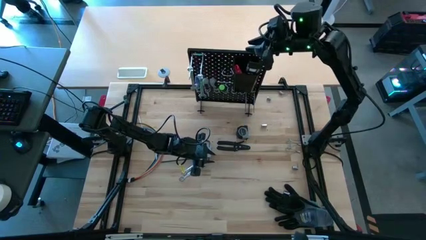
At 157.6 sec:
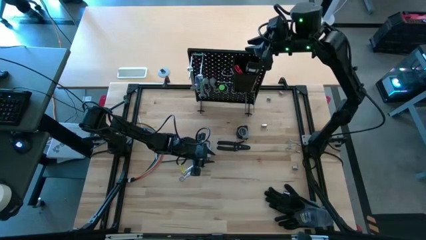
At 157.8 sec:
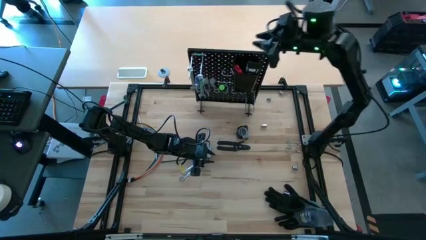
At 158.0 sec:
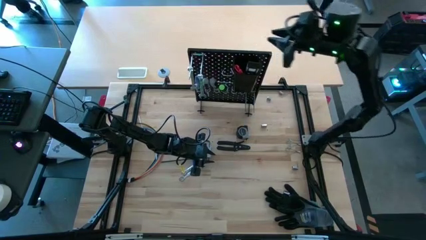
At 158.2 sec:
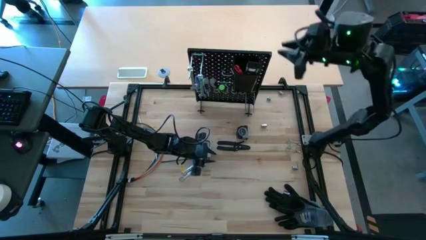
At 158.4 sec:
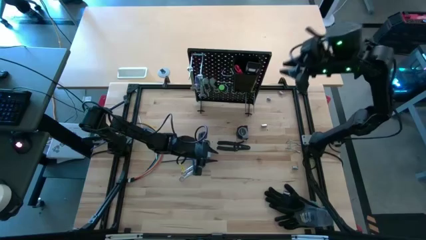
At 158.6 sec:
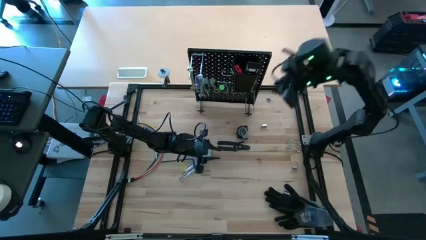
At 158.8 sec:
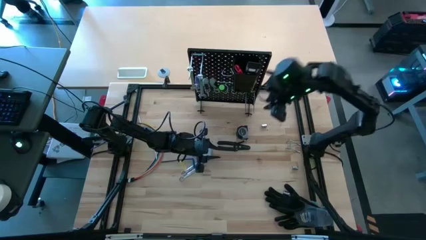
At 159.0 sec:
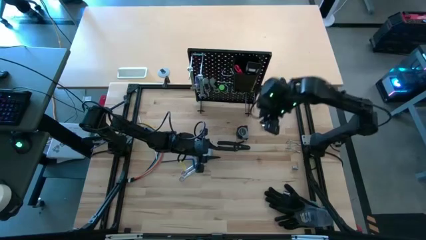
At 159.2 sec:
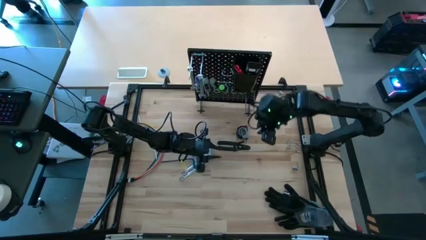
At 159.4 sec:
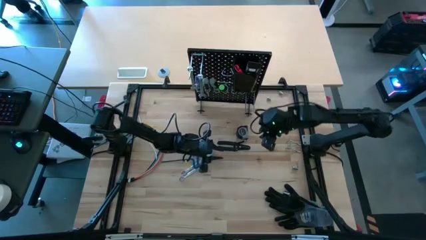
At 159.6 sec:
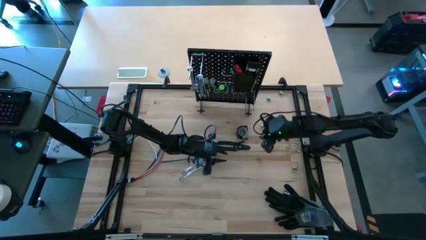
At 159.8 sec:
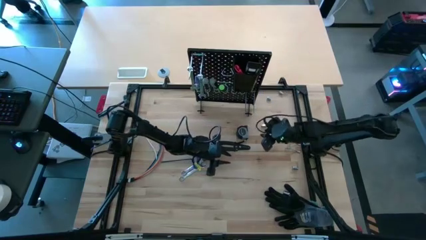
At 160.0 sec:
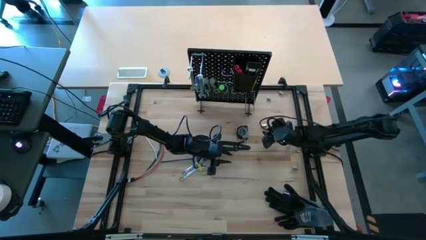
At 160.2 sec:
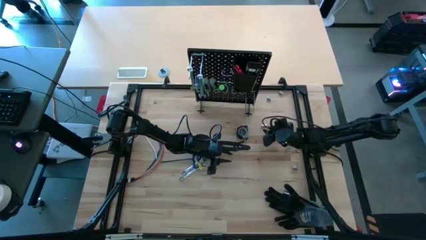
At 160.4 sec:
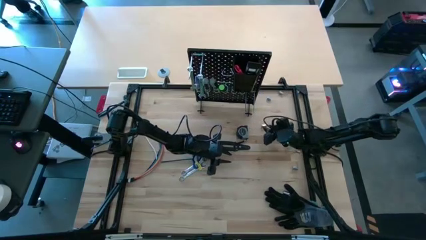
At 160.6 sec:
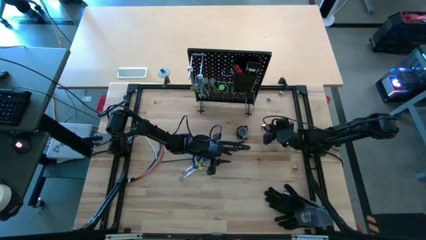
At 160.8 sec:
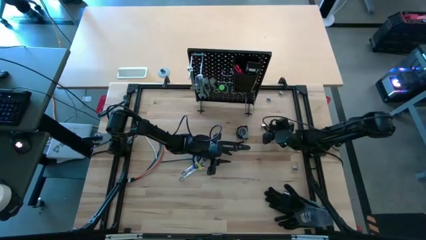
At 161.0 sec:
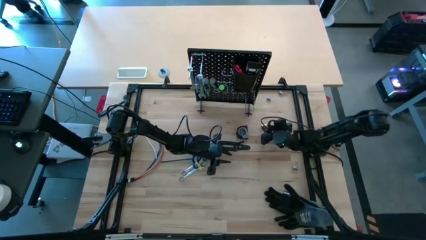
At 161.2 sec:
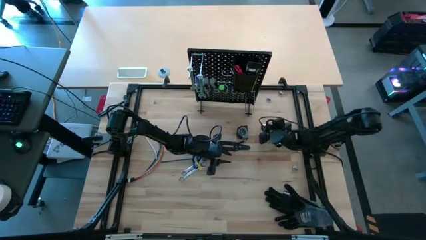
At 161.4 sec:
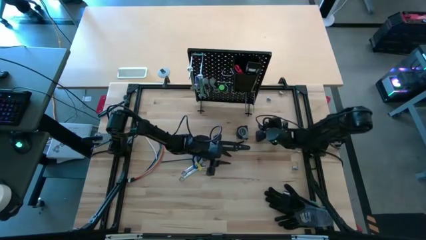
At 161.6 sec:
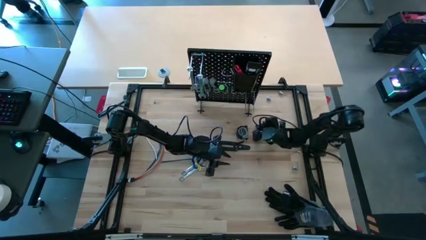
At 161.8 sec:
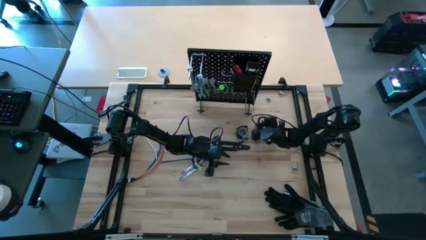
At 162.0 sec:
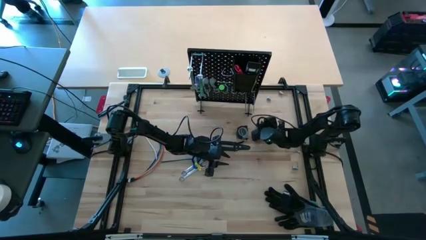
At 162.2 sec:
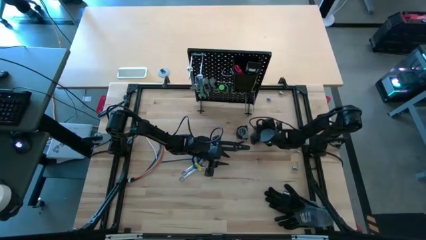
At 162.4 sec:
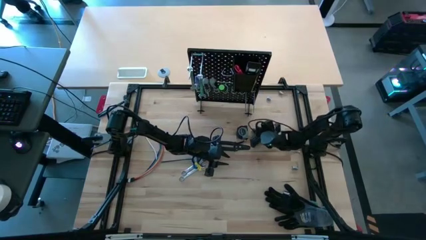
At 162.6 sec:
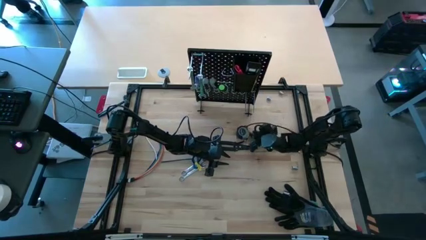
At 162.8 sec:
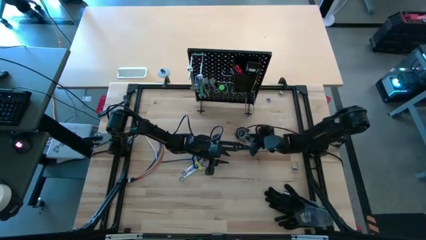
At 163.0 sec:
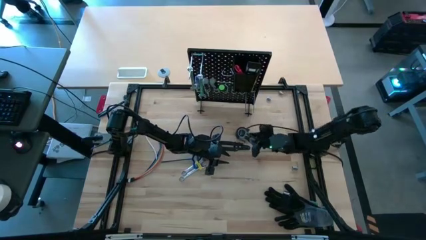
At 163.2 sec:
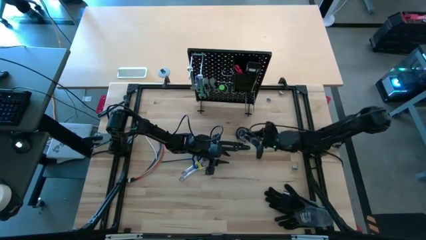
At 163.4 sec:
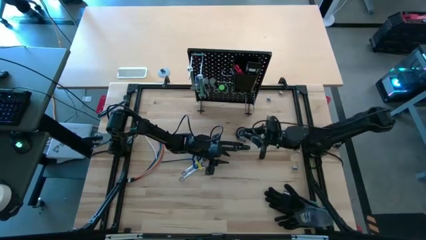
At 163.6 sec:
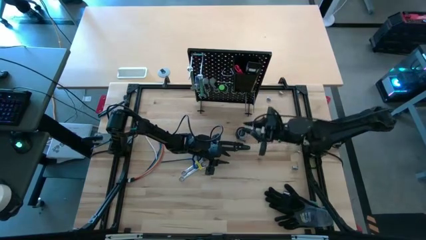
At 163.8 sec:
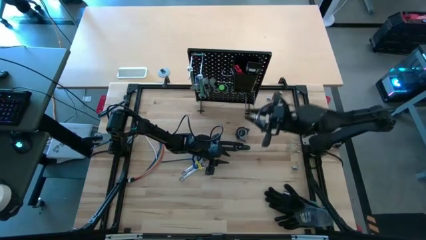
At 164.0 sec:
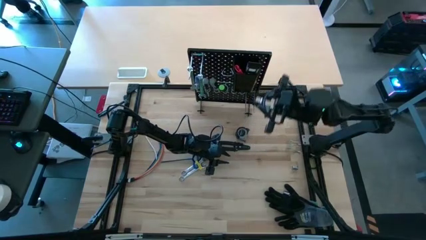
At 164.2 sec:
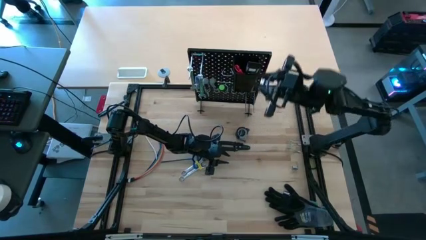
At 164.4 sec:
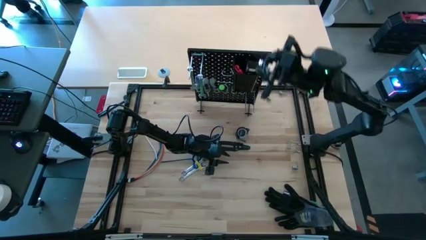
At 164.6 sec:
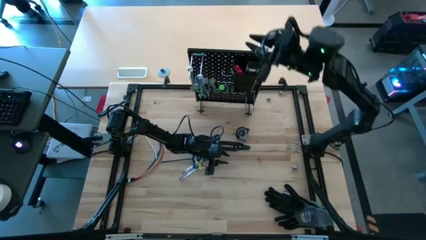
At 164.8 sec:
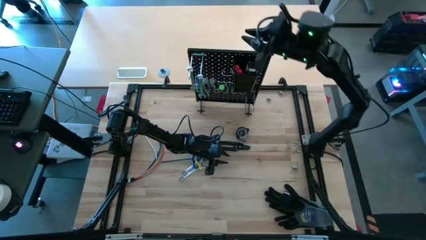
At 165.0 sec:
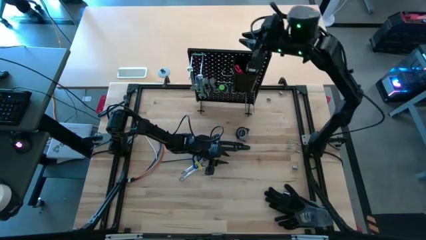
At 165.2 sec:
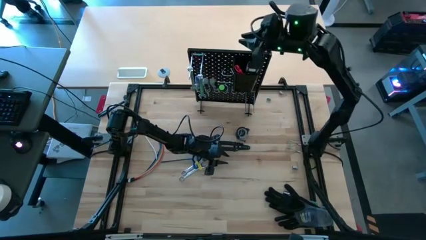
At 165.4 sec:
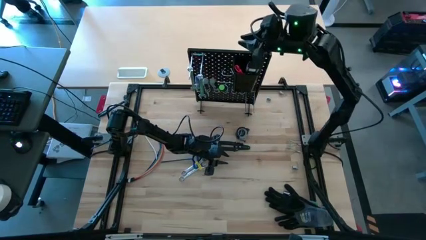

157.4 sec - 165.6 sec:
Task: Hang tools onto peg board
Put the socket into the black bin on the peg board

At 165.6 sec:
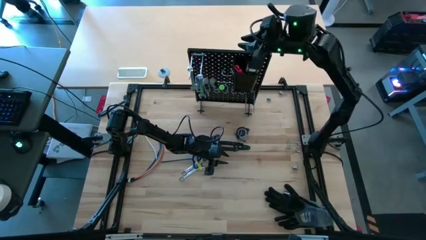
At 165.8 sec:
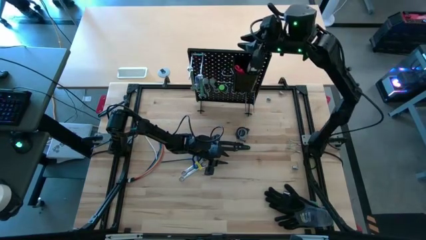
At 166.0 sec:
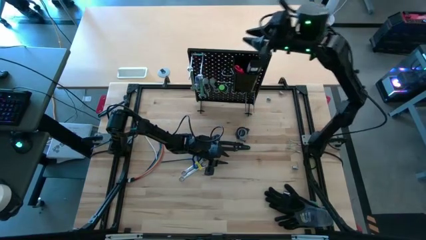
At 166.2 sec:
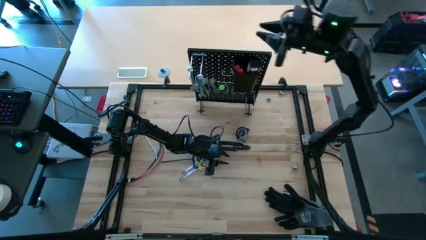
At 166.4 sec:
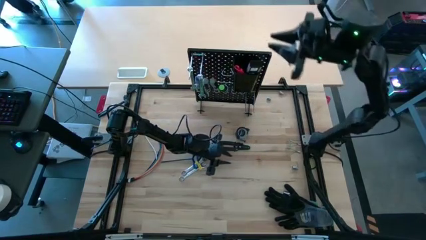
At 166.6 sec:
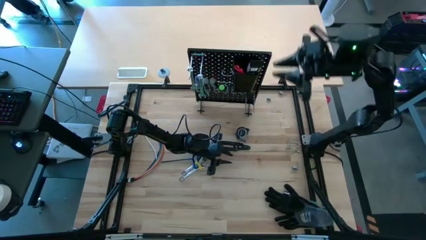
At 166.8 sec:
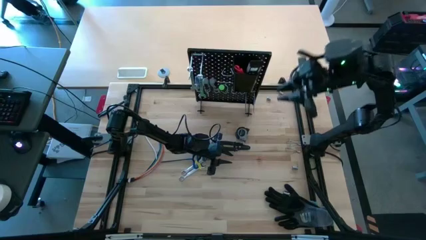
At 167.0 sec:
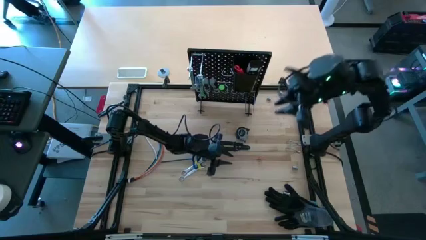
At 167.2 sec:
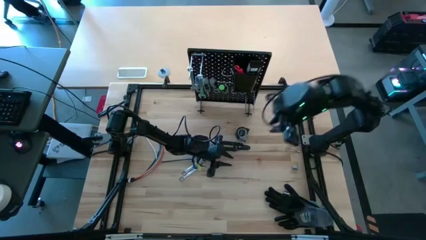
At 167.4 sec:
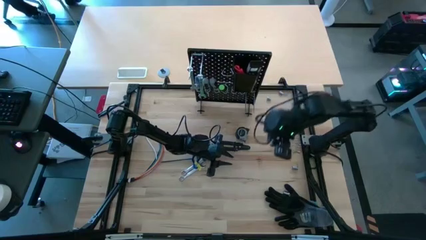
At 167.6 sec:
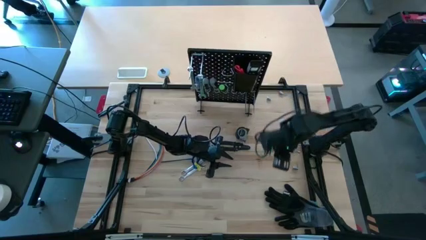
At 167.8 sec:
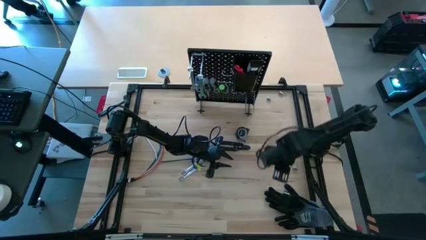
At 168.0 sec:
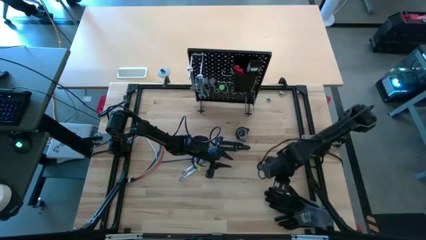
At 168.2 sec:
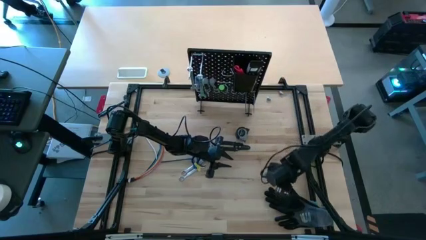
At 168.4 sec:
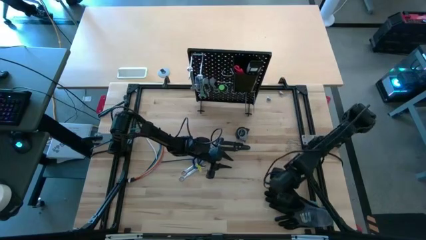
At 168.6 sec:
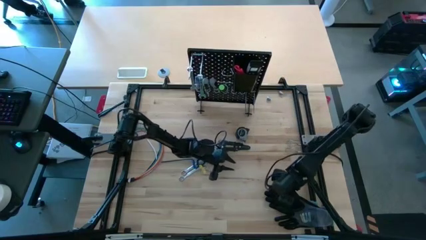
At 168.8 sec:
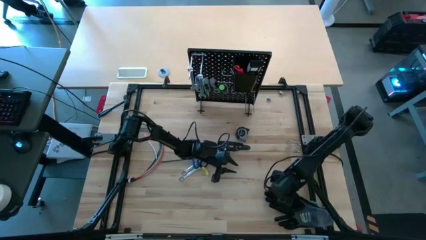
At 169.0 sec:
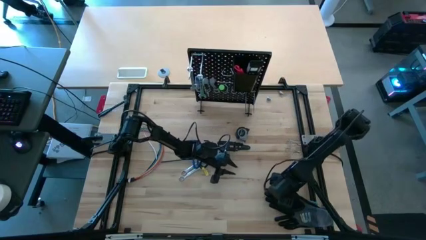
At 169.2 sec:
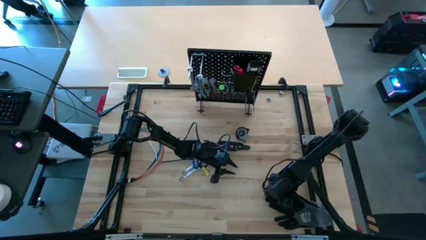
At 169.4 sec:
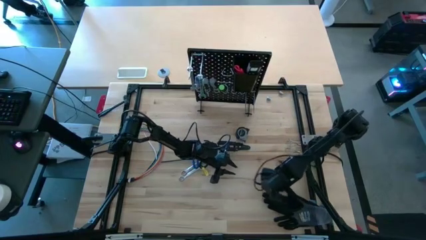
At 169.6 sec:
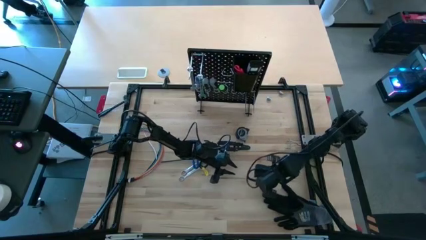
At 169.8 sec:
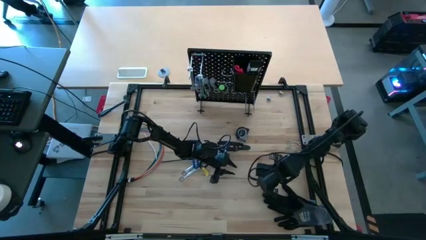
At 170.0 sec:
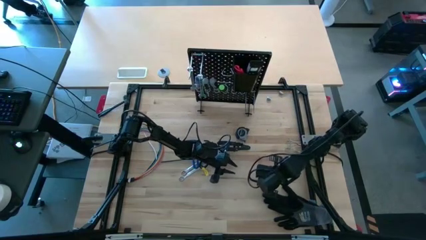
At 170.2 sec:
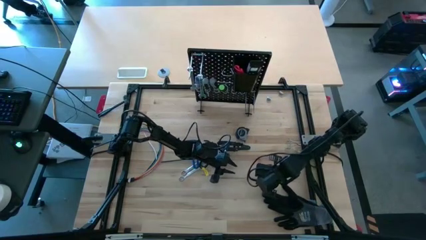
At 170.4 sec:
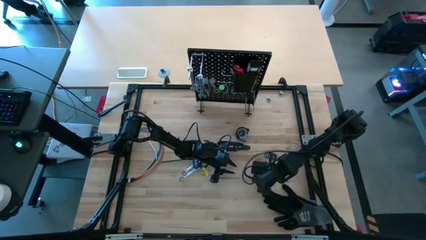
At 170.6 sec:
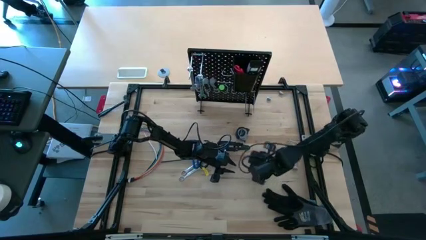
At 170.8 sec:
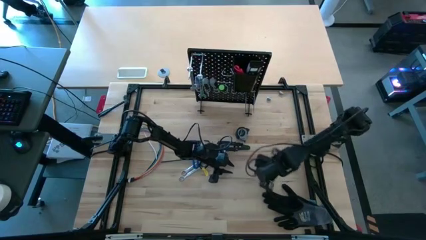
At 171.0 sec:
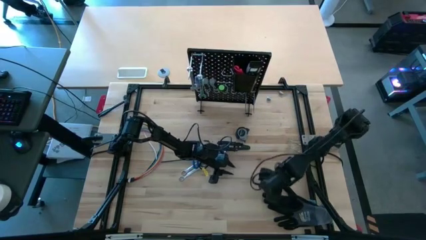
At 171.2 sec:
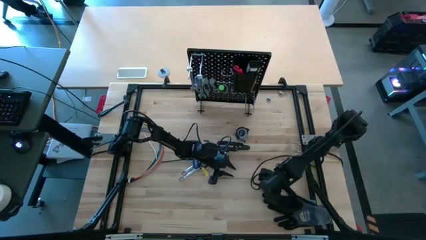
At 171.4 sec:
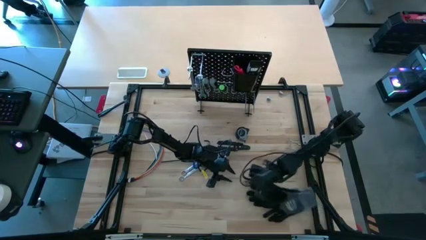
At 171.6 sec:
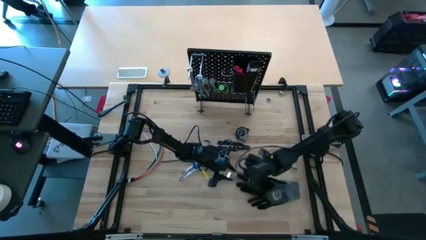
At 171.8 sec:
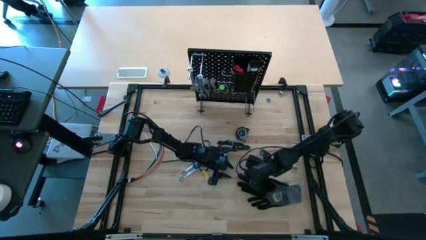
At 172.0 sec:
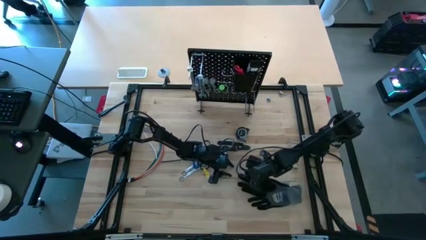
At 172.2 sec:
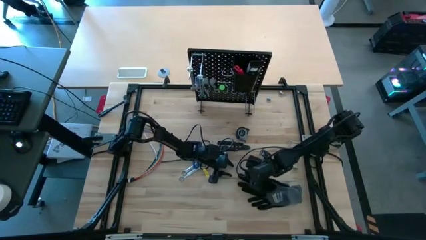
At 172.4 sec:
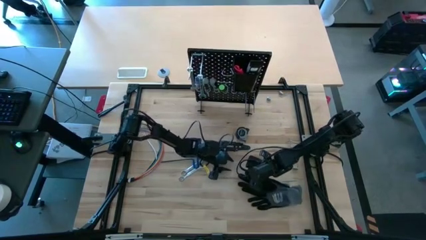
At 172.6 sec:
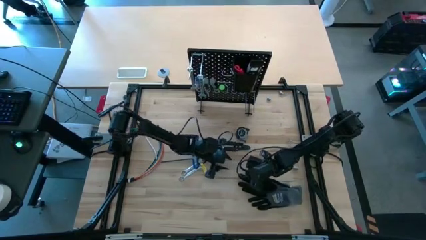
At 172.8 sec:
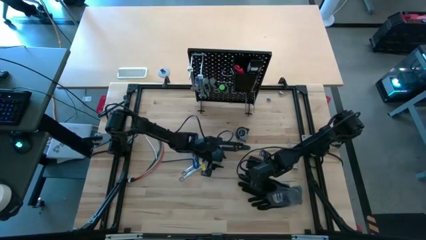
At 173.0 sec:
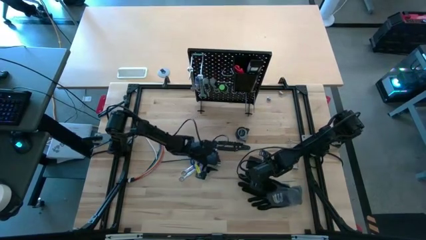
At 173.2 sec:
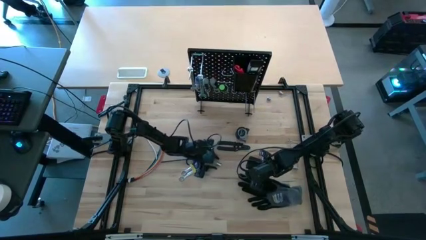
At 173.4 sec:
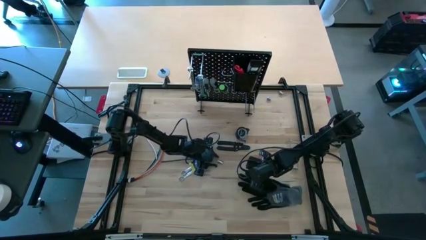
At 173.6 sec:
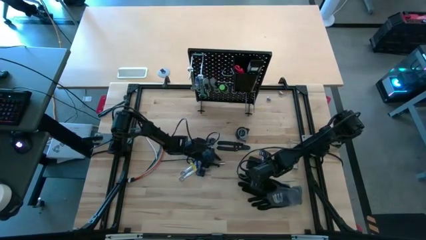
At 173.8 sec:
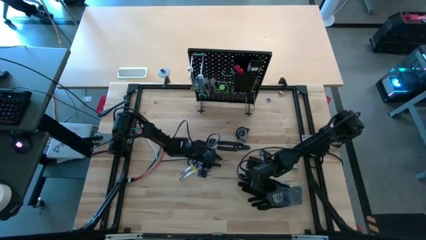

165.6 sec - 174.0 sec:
Put the socket into the black bin on the peg board
